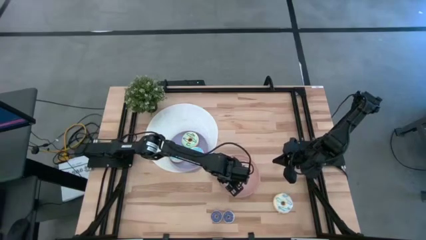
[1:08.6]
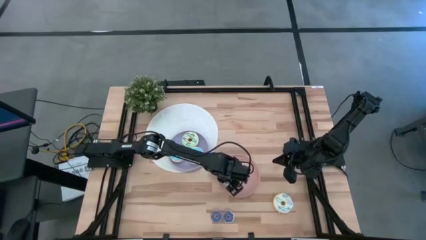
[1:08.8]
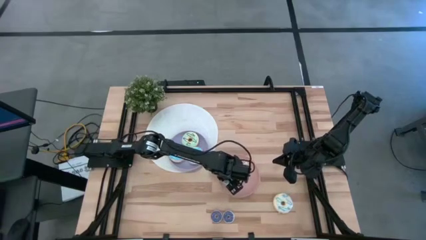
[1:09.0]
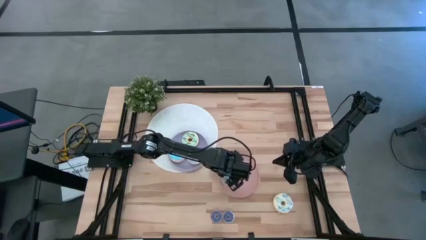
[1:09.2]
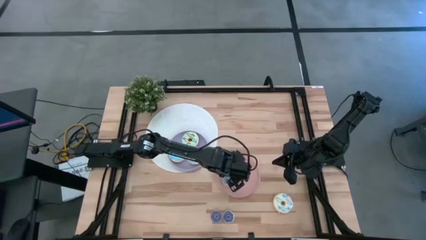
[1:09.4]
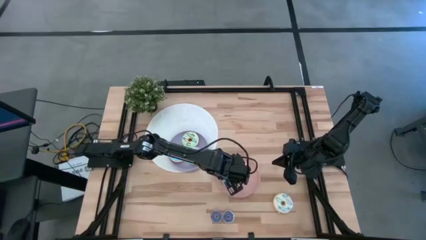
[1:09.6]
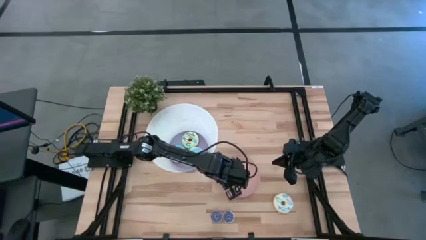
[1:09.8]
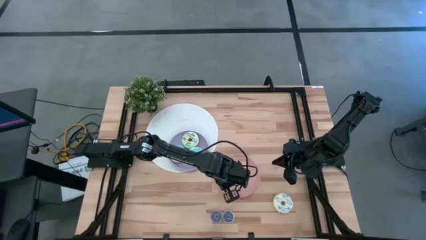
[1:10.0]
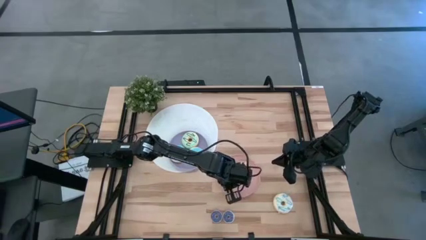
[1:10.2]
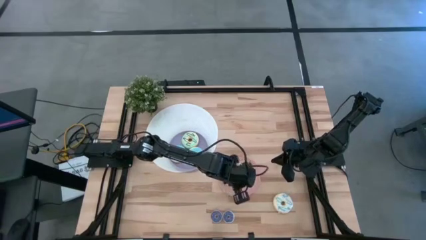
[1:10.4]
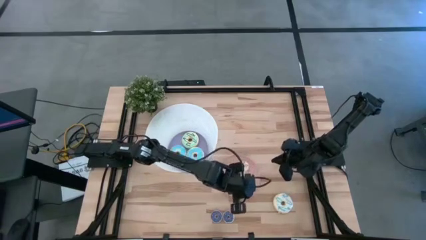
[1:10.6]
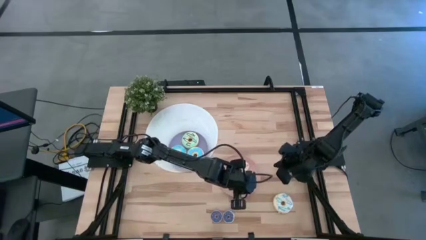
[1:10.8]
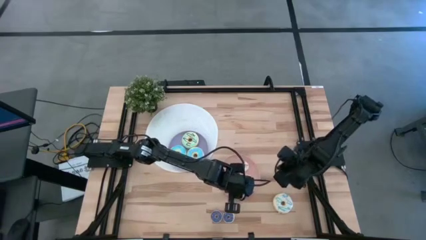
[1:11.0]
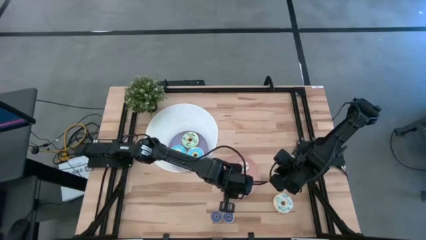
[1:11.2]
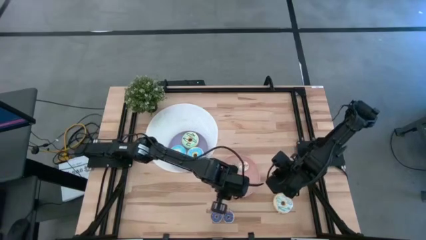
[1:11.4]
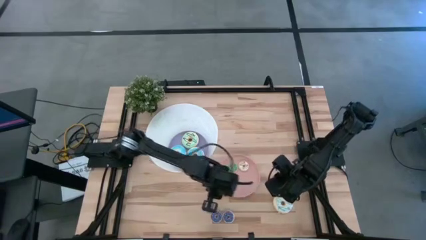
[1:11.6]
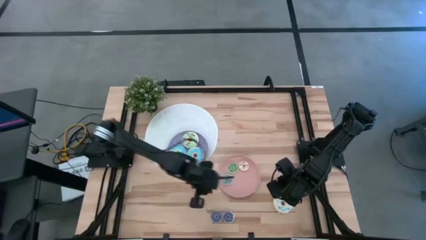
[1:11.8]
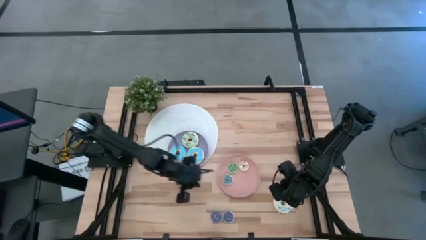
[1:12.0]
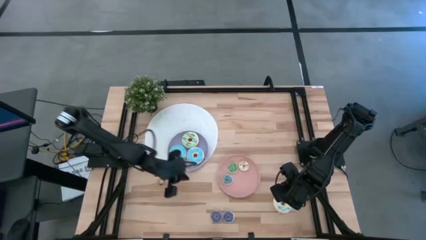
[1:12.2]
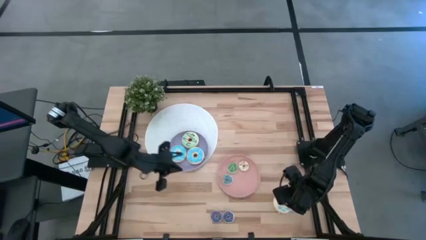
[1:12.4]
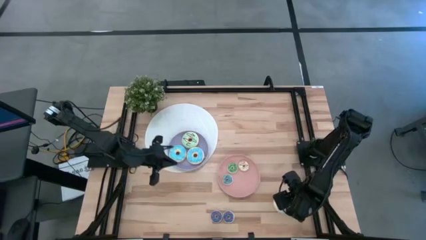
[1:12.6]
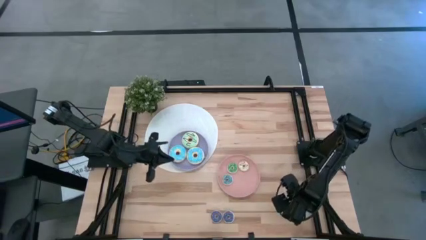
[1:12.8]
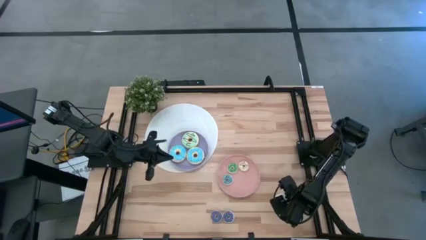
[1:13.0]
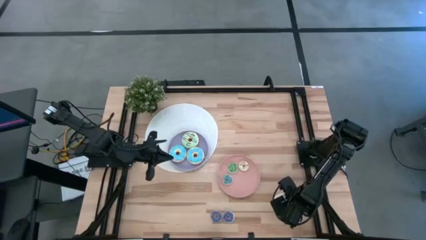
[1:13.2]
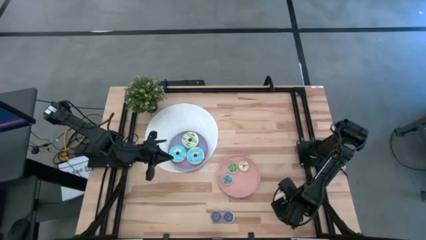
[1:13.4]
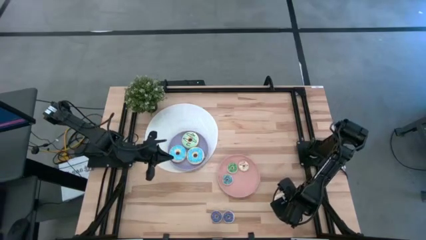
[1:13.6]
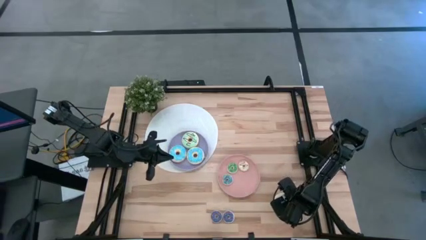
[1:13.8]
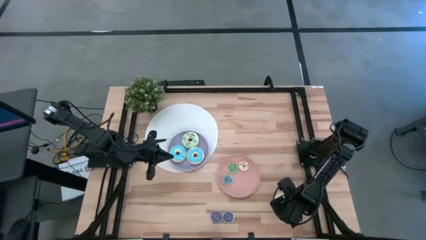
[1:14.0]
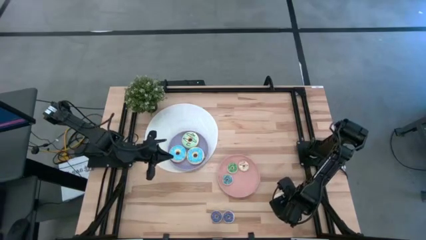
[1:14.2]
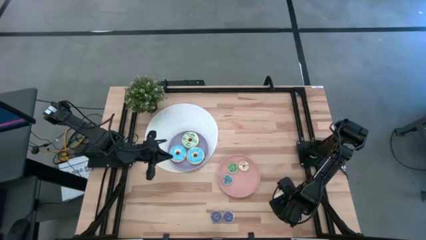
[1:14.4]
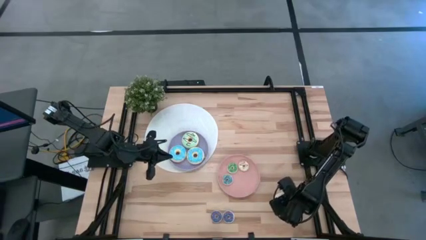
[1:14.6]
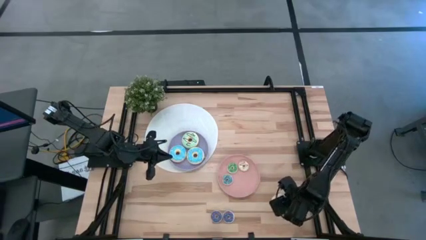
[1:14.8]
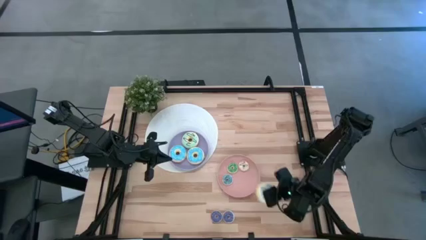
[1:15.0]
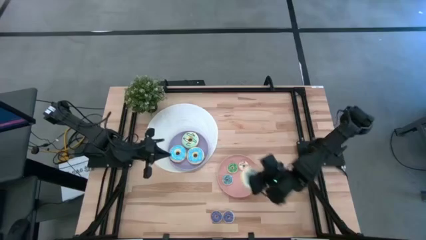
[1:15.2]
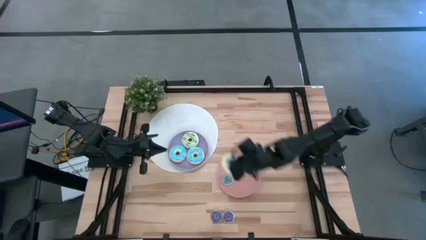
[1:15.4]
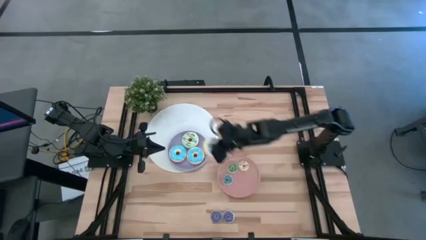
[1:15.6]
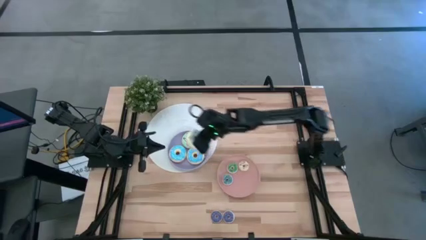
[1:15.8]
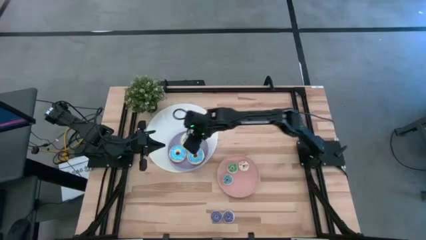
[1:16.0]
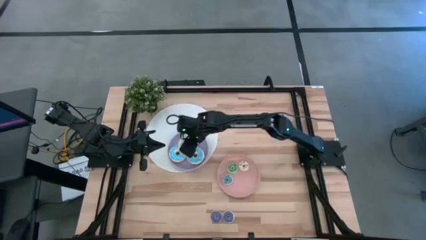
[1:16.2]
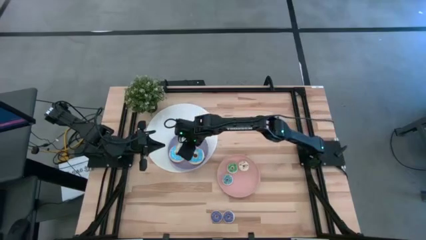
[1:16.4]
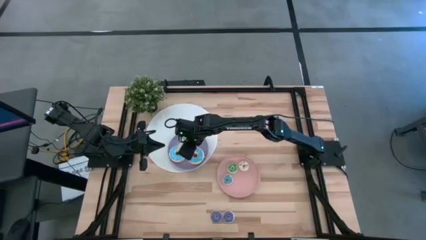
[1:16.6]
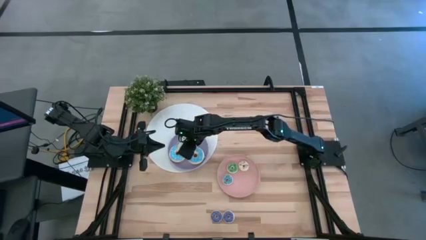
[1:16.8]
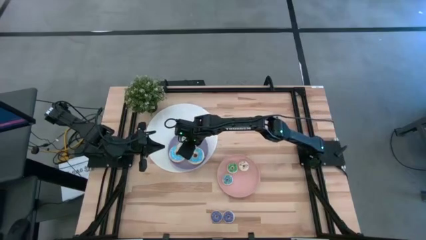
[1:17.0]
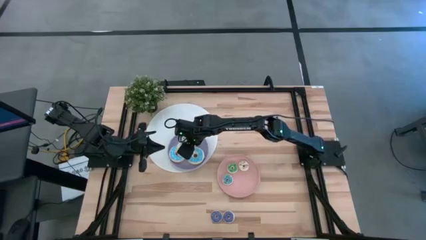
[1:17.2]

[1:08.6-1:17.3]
Task: Pick & Place donuts
Put the big white donut on the purple plate

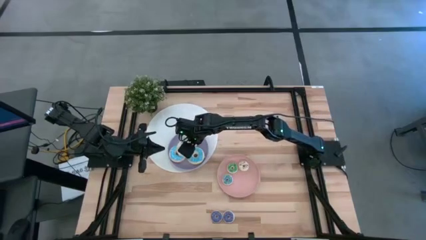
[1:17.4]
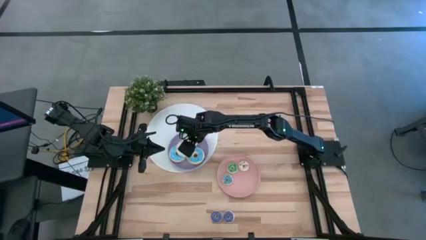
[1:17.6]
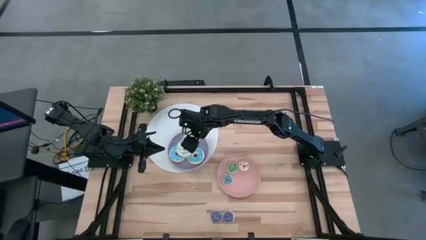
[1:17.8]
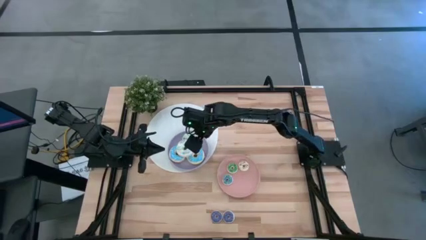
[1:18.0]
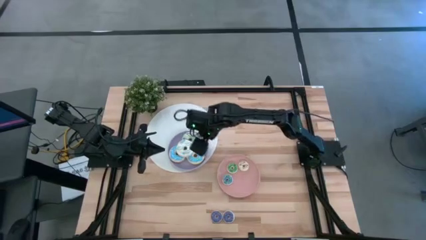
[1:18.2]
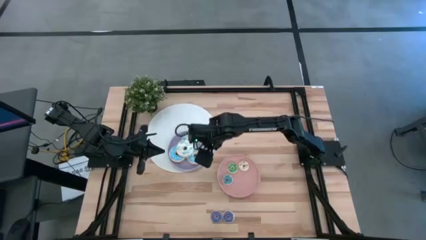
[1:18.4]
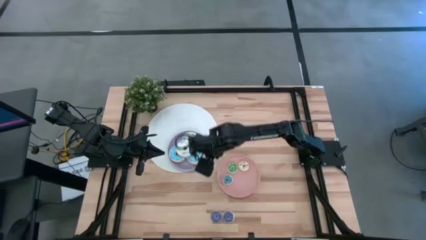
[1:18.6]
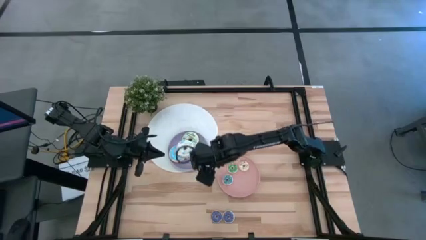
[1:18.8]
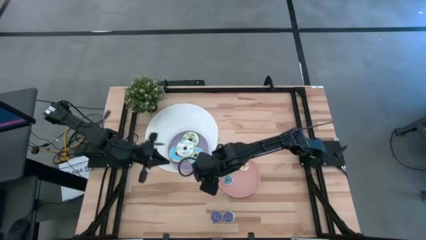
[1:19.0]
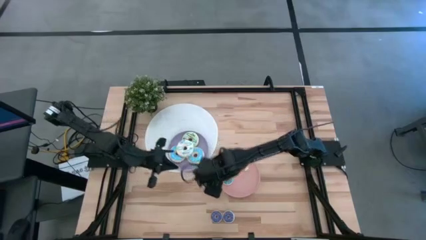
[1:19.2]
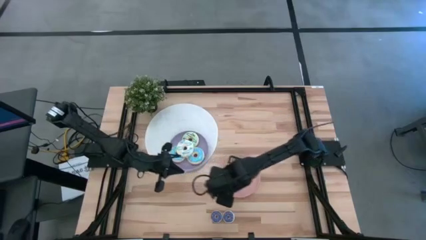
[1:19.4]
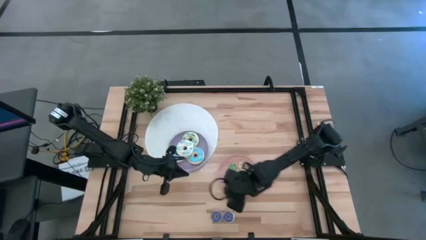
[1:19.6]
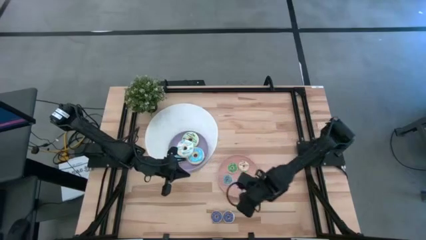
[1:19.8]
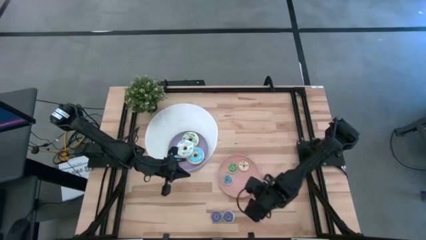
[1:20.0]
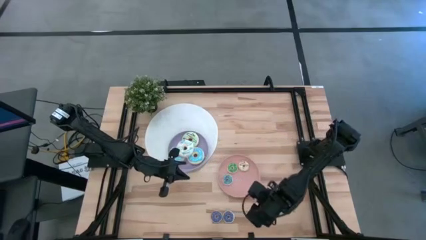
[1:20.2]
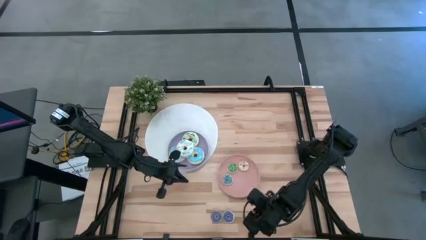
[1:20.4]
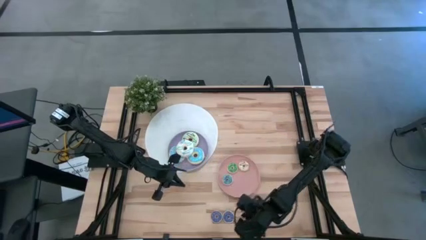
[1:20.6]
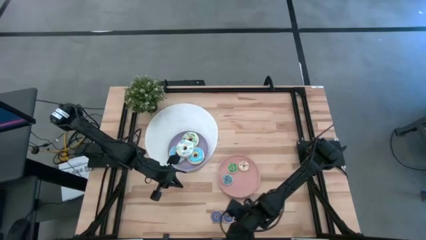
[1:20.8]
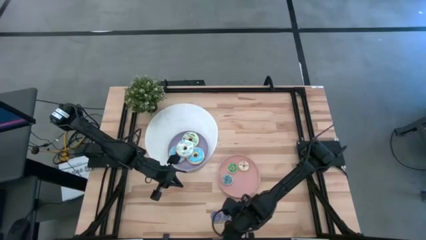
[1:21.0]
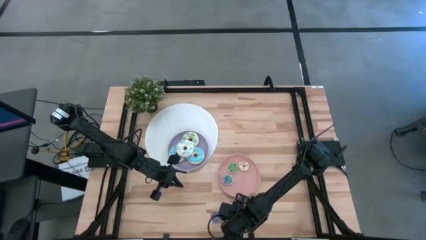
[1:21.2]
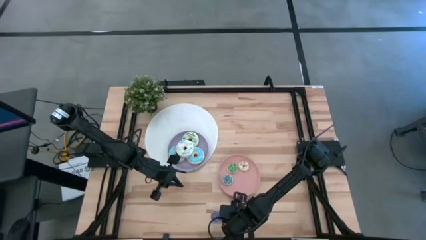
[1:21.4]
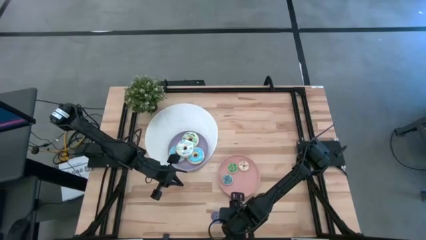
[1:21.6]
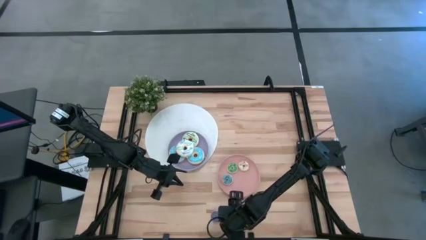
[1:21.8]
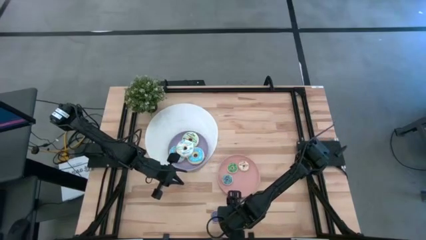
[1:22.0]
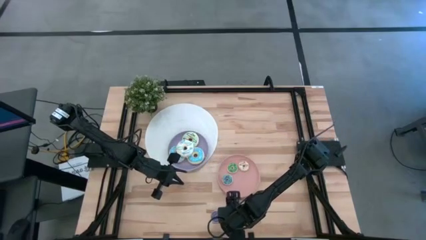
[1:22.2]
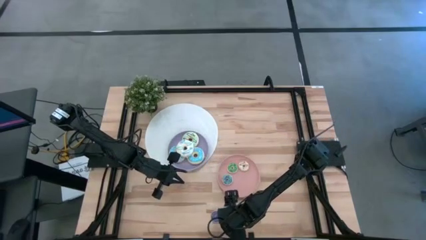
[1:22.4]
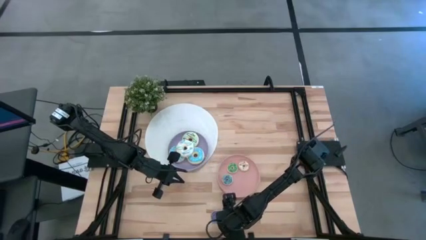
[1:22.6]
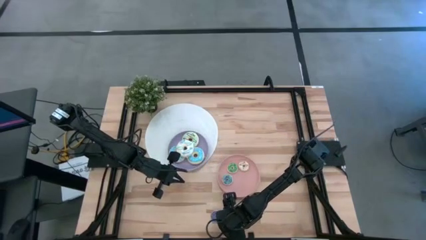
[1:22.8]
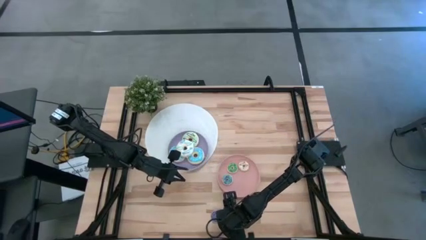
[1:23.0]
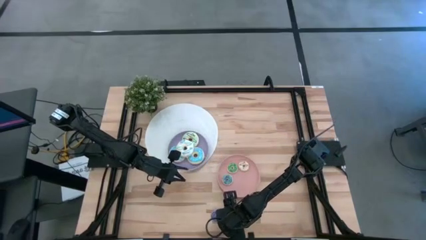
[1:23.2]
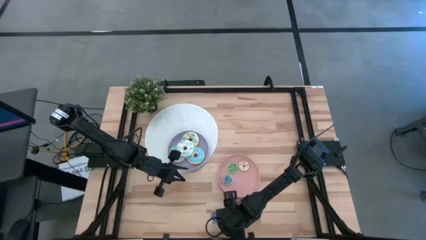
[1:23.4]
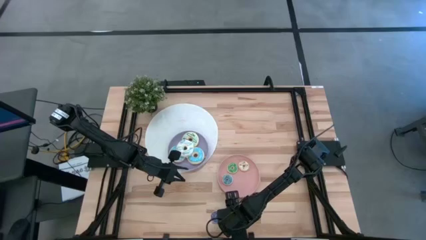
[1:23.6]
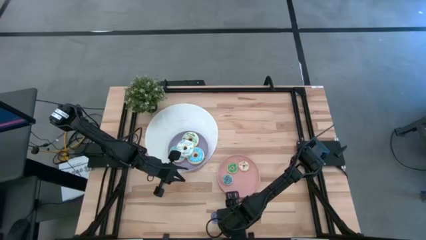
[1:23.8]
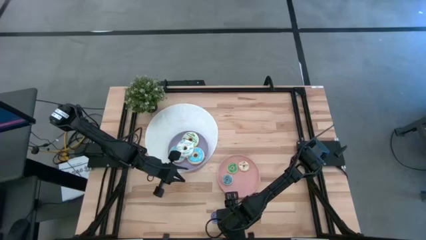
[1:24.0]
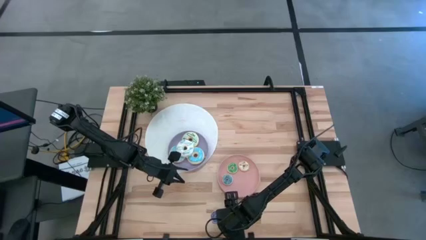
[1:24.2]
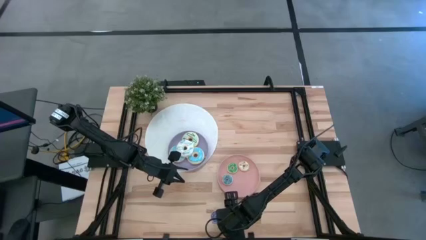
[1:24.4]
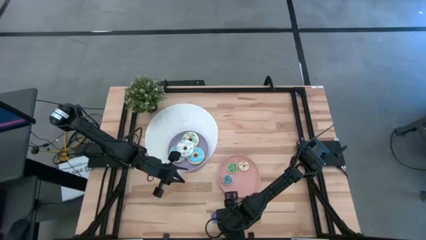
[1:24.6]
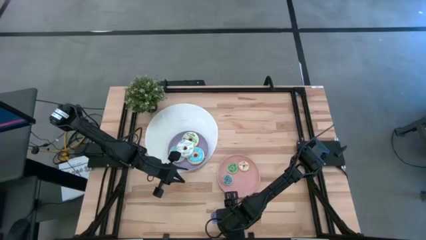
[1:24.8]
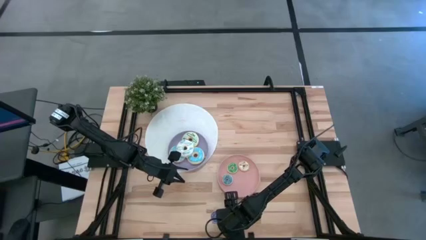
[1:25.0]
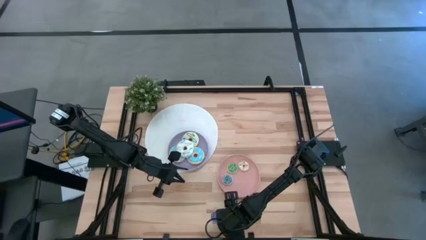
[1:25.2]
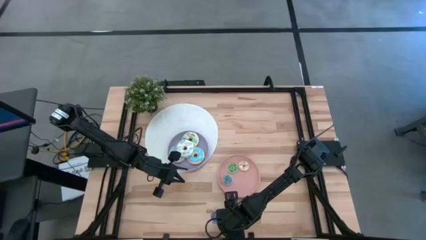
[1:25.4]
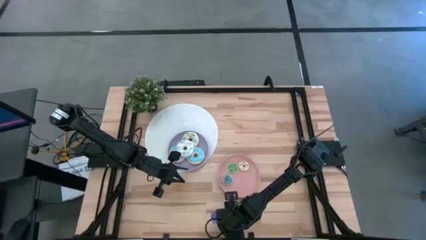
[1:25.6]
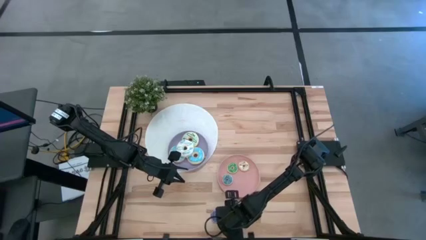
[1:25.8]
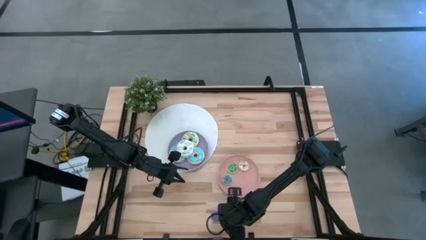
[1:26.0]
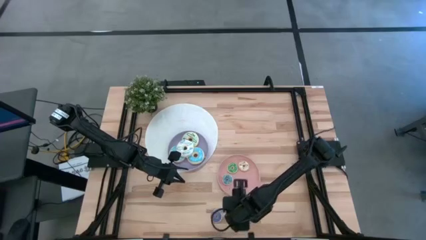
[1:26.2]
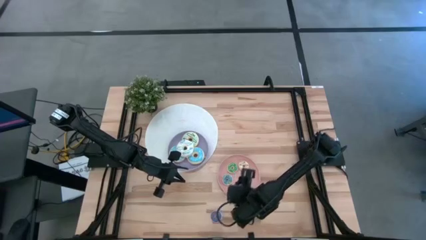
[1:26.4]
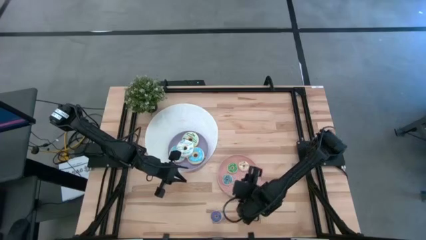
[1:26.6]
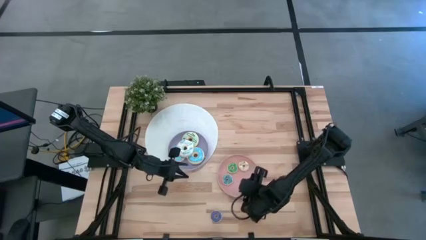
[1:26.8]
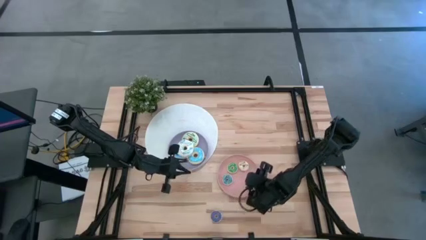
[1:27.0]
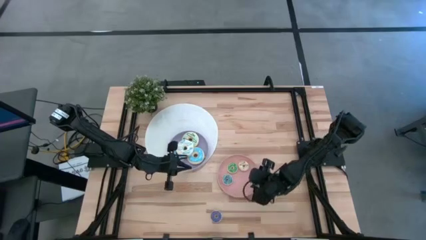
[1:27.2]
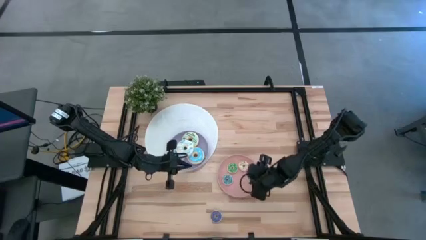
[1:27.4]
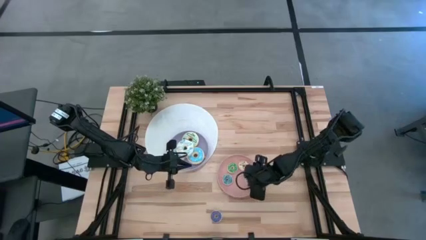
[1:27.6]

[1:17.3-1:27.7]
Put the small violet donut on the pink plate
